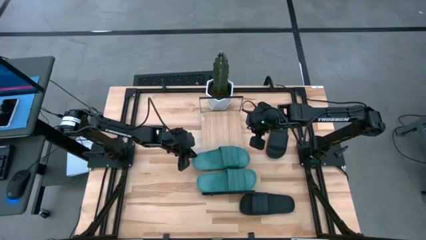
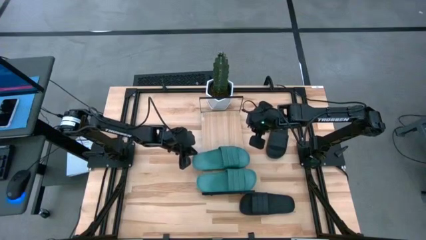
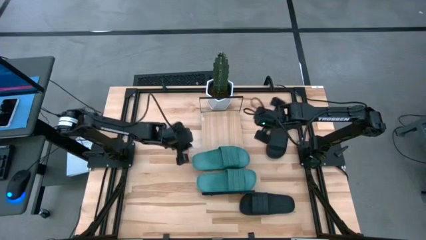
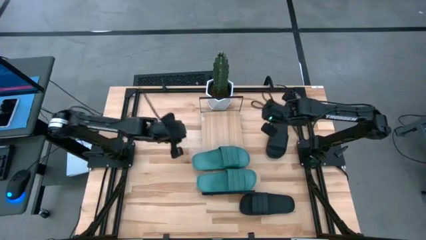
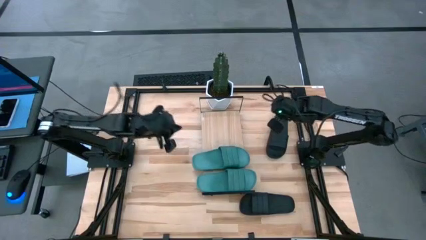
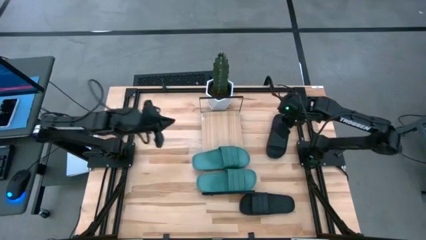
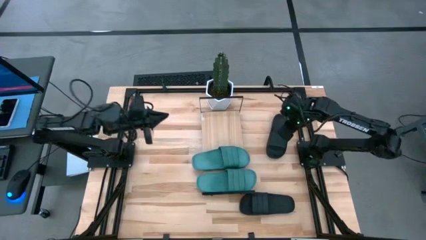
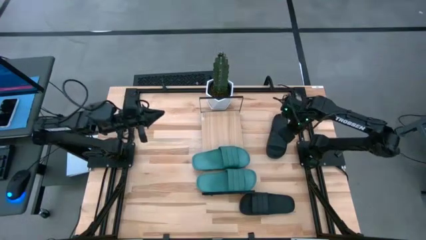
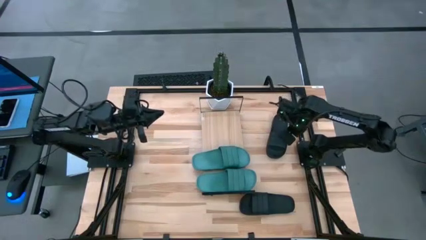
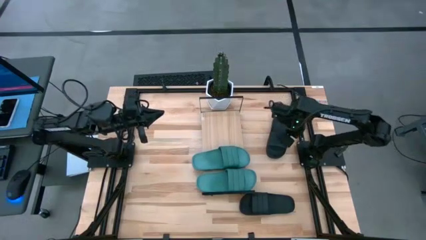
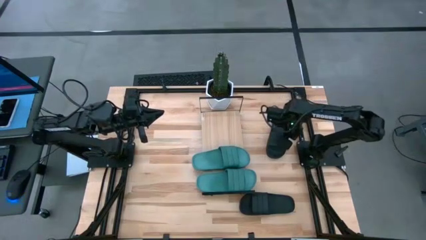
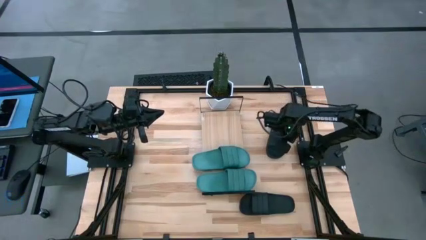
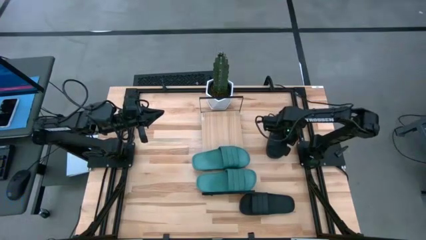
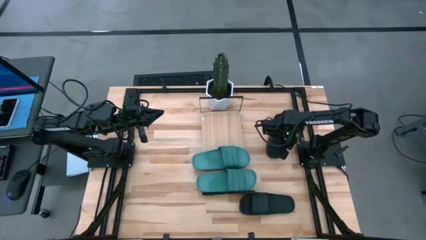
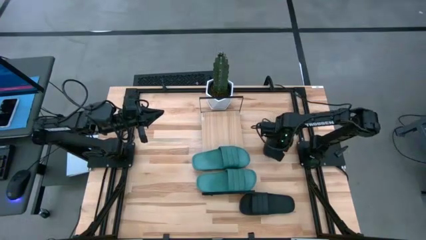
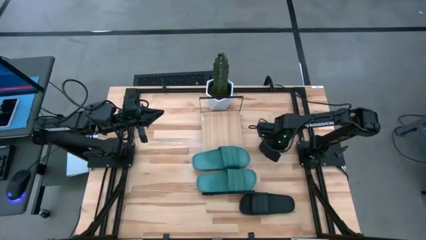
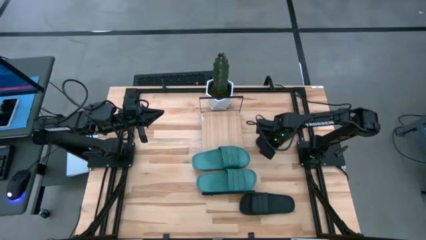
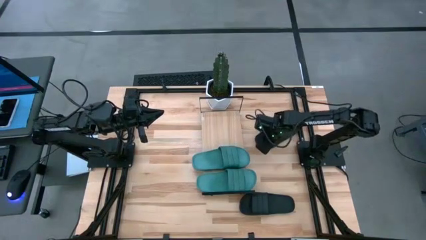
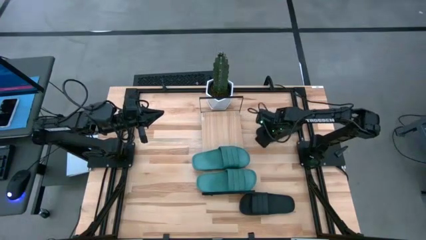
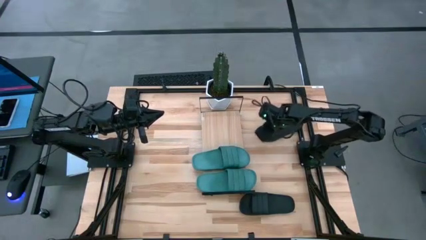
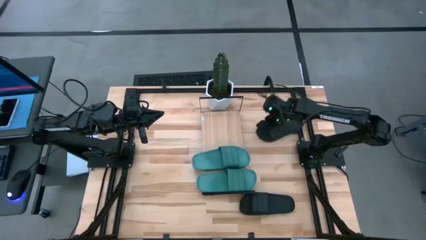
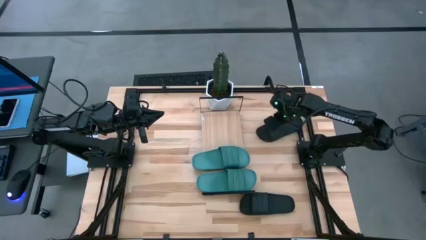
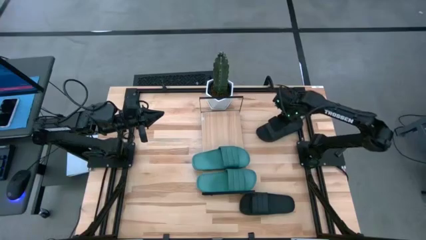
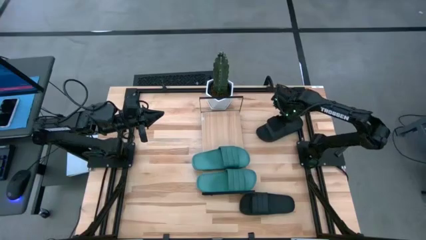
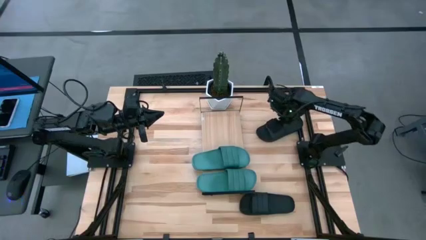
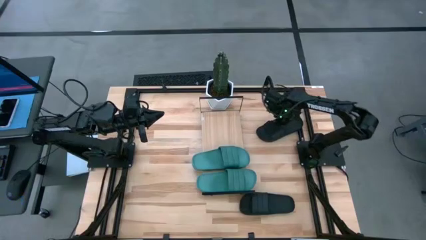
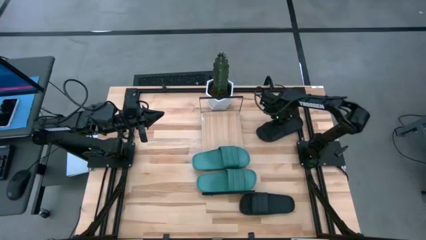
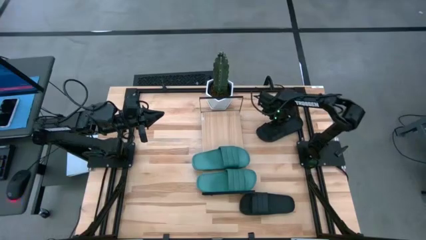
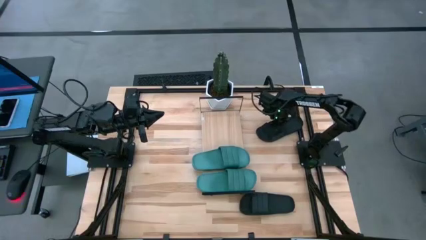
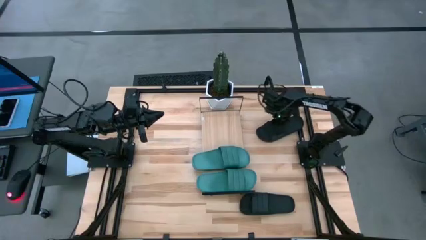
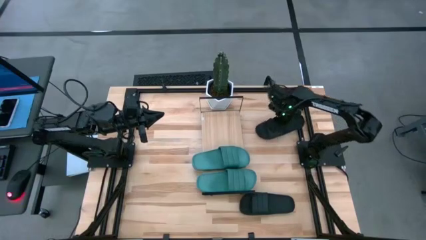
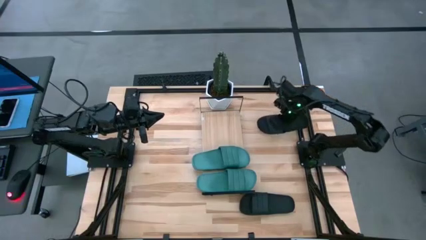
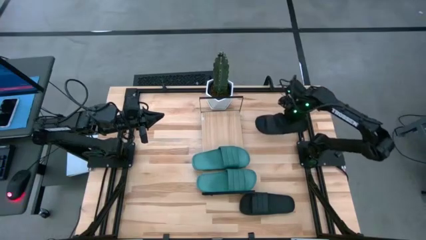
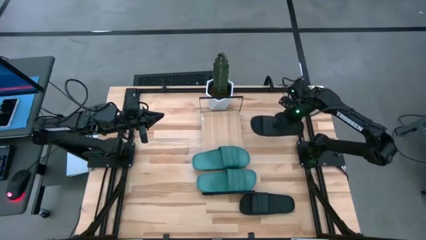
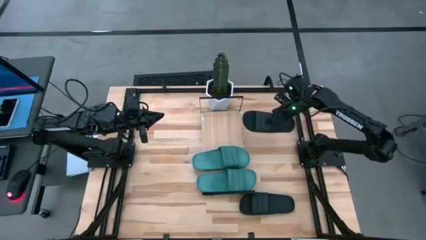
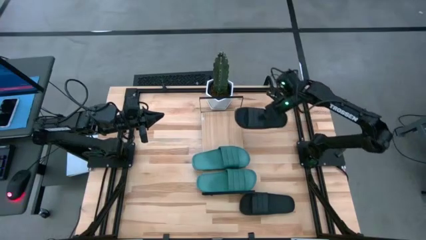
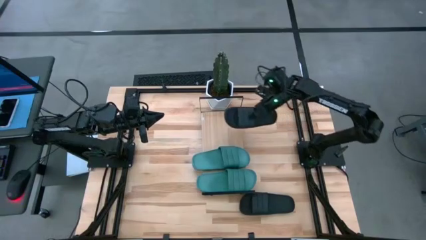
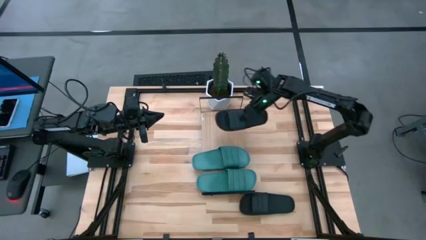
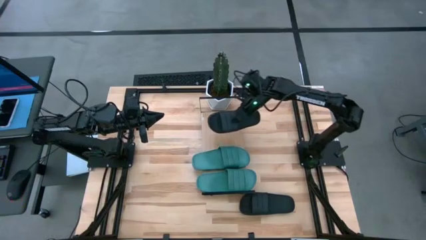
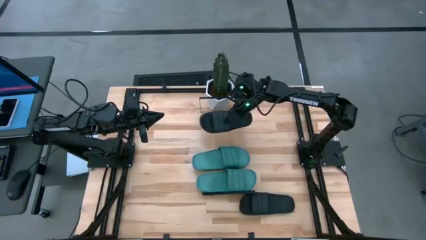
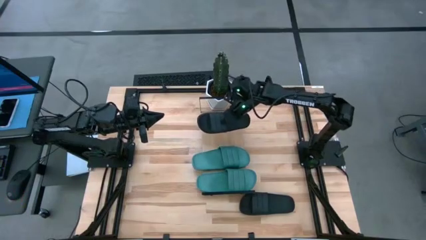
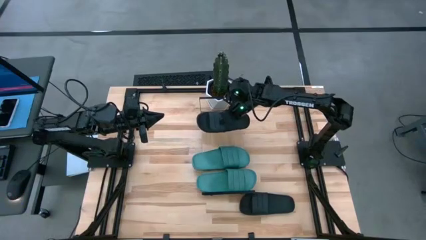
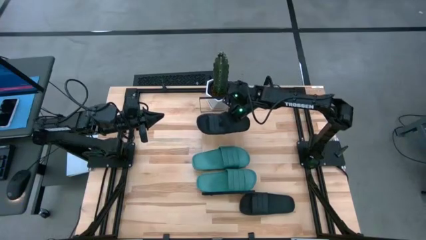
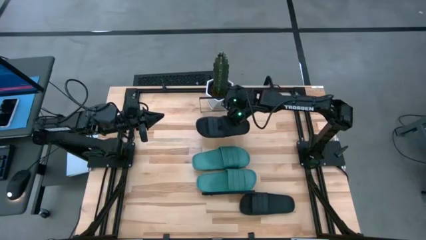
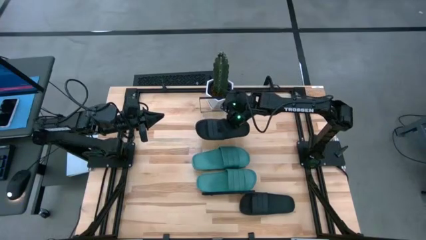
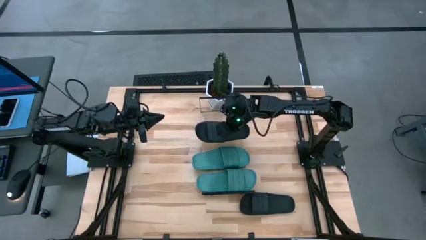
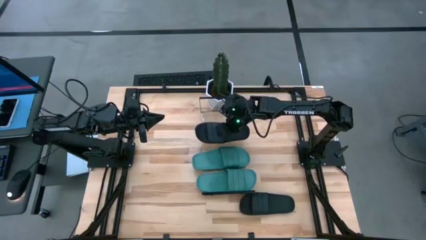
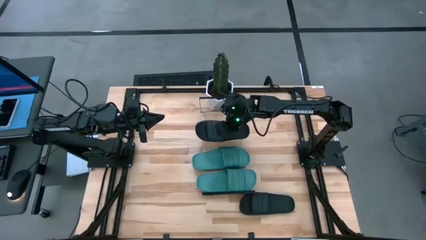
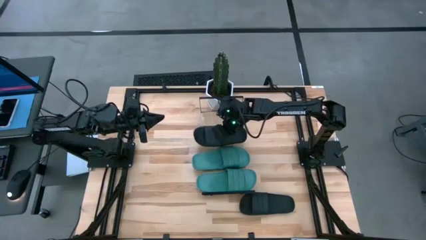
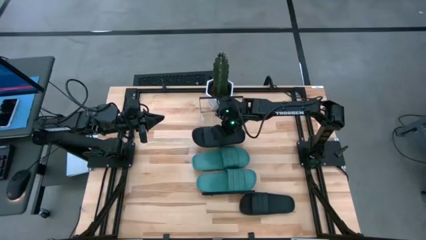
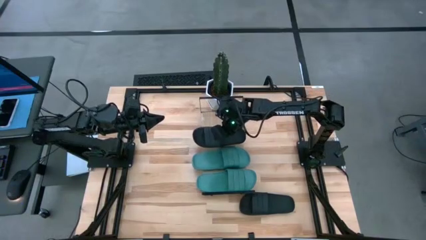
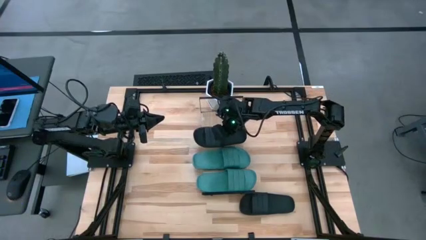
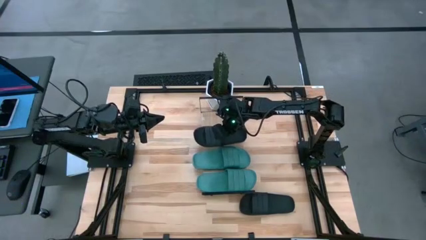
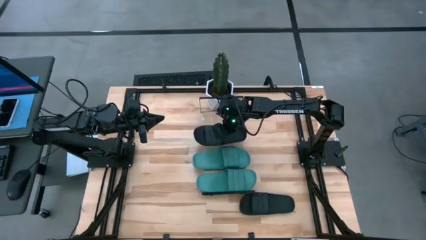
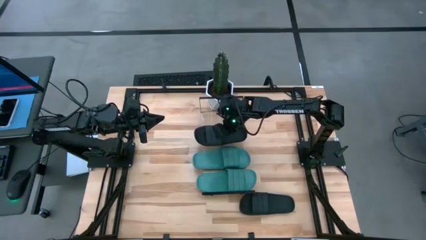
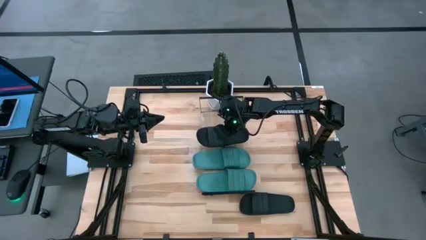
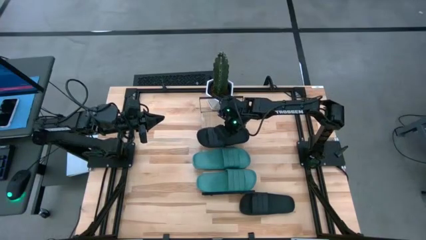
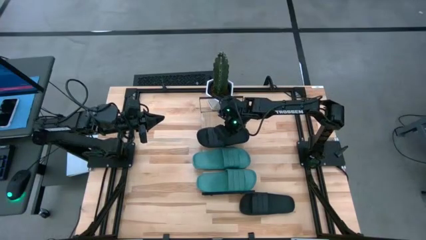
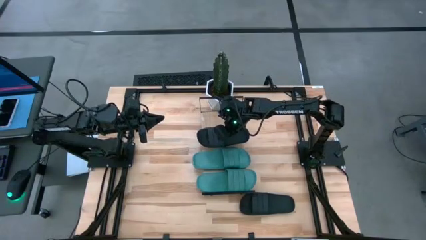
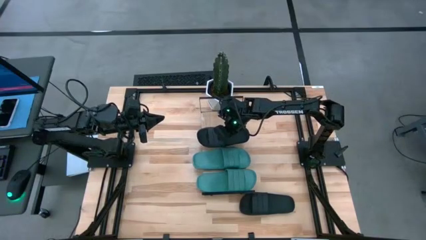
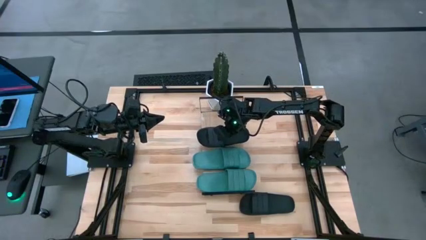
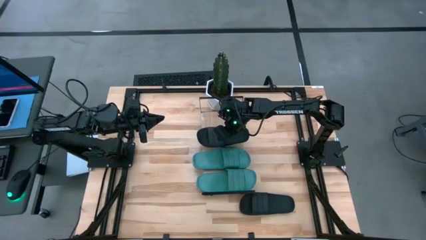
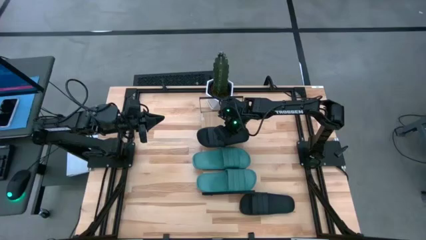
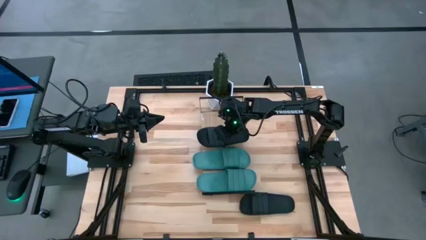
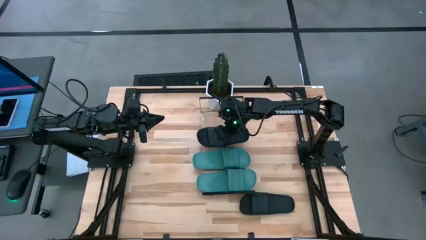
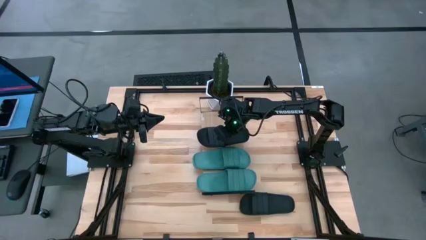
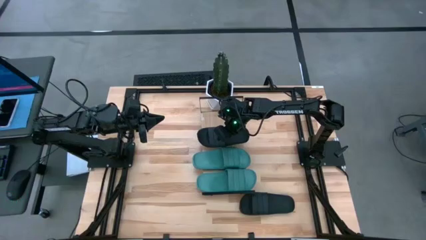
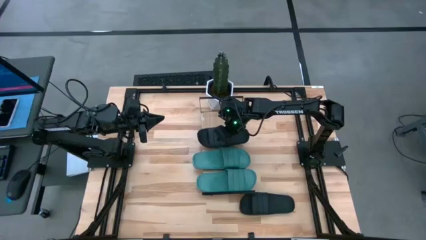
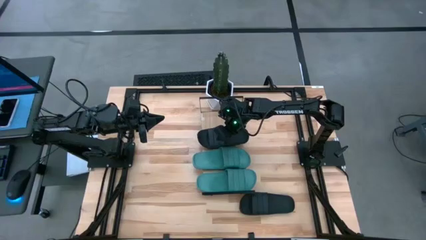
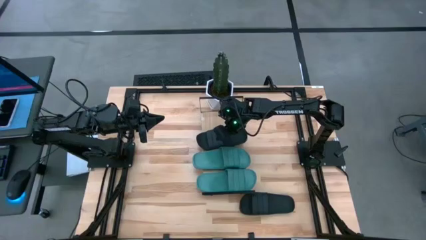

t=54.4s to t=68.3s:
Task: Pick and place slides into the shelf
Put the top black slipper on the shelf

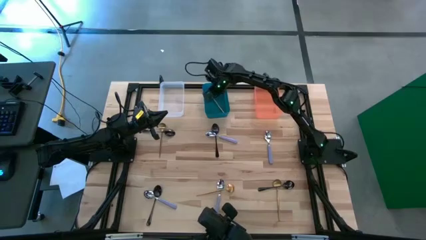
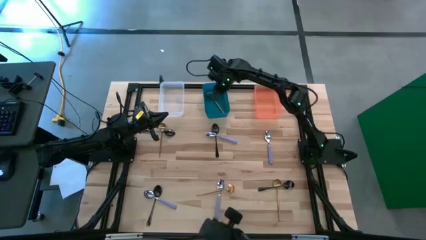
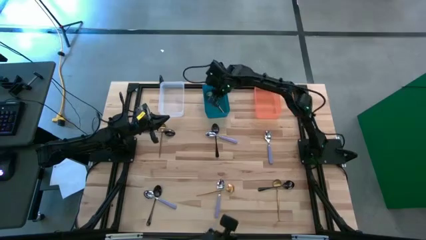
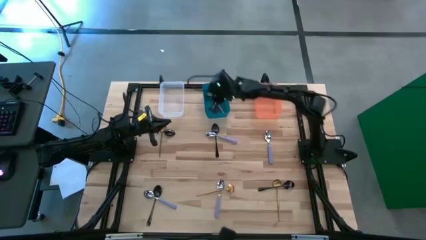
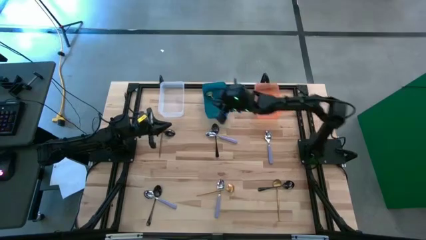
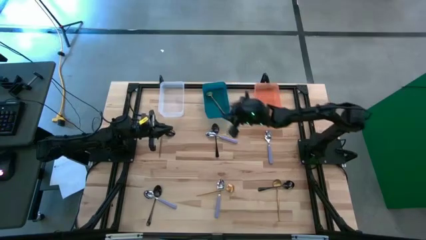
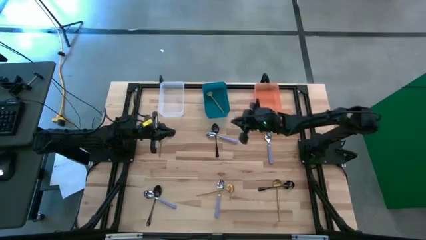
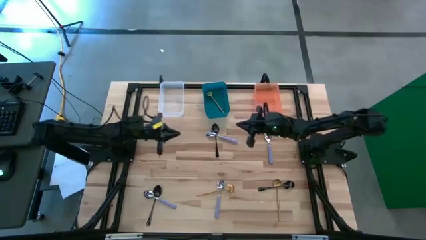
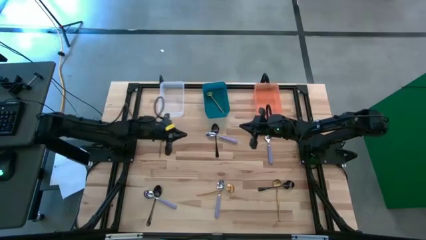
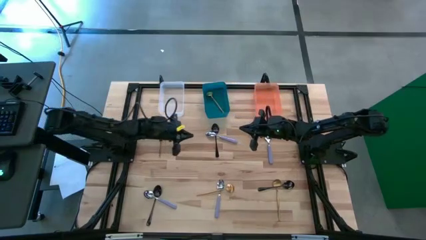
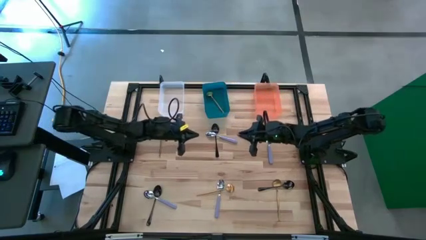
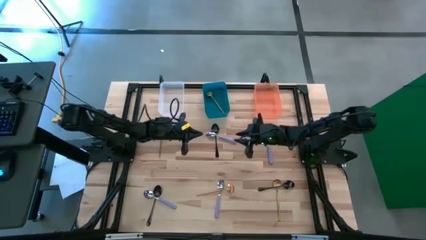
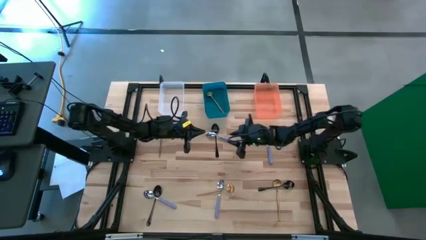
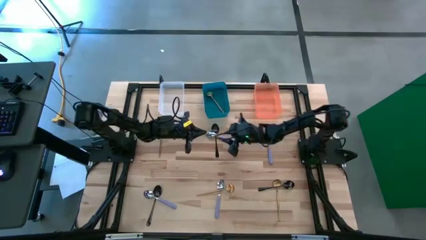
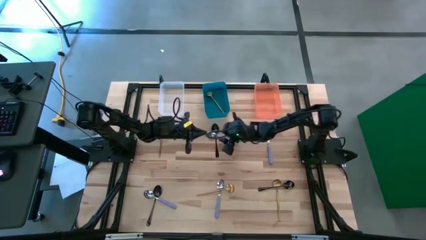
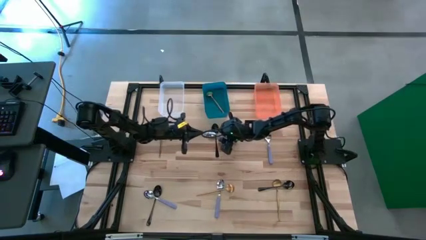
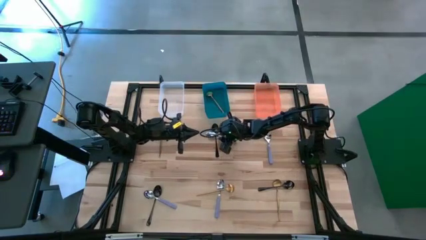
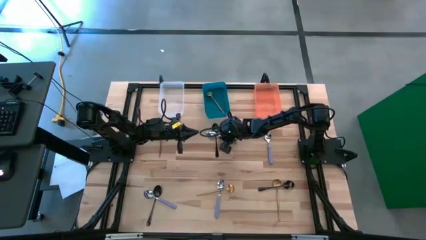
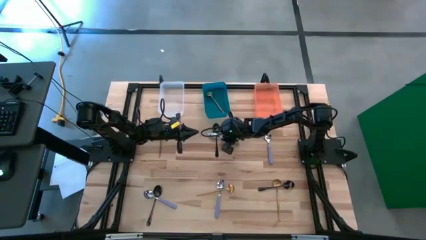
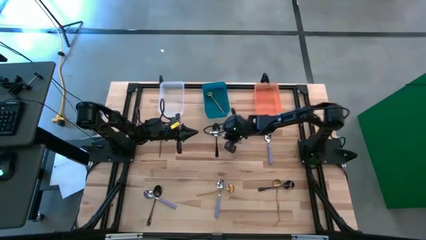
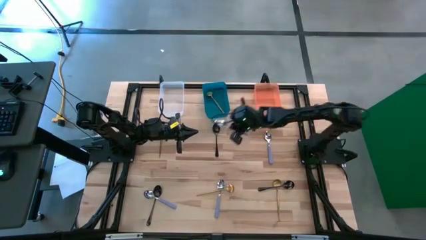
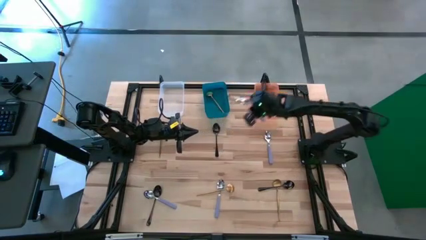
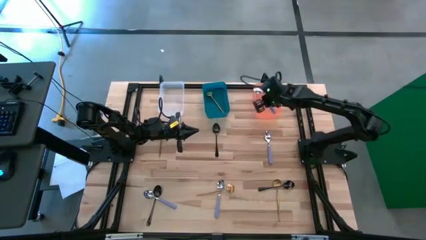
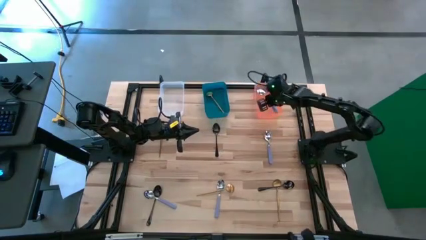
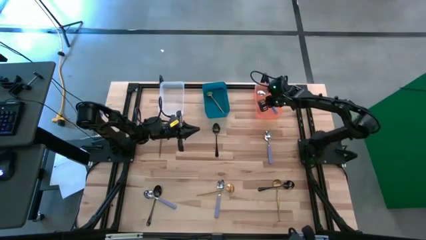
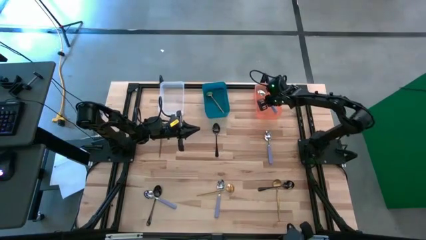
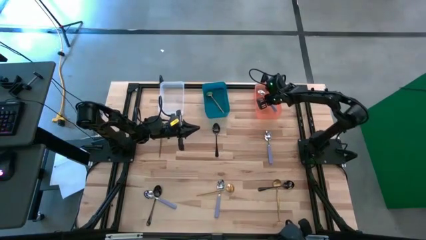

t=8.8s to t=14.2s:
Task: Sort silverware by color (type)
Put the top center purple spoon into the orange bin
